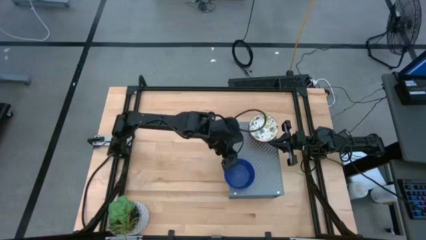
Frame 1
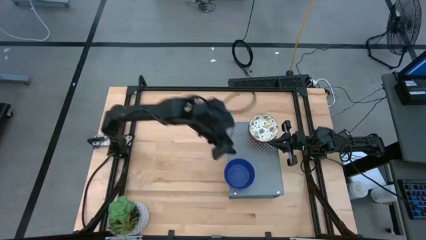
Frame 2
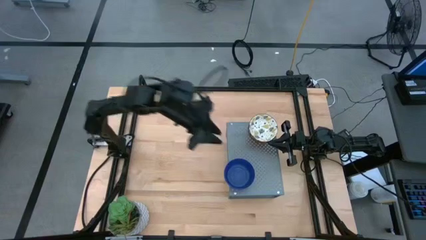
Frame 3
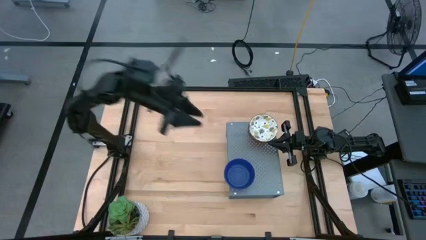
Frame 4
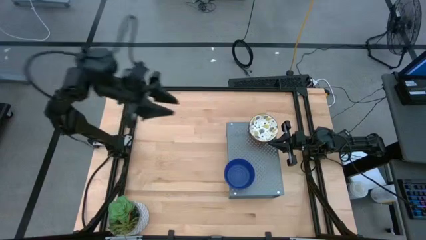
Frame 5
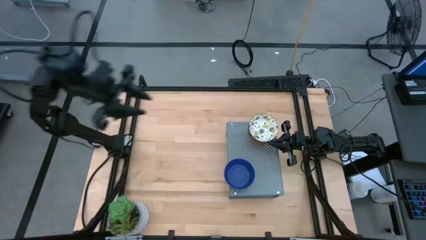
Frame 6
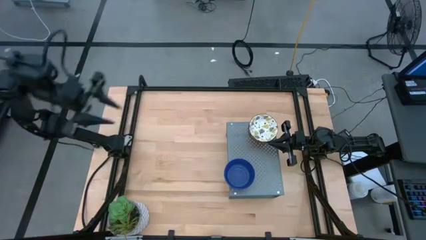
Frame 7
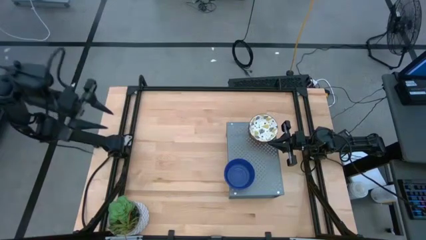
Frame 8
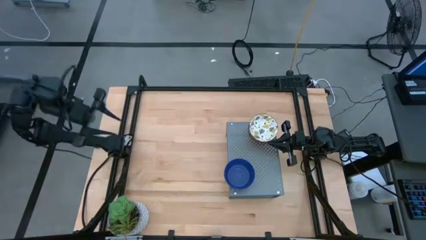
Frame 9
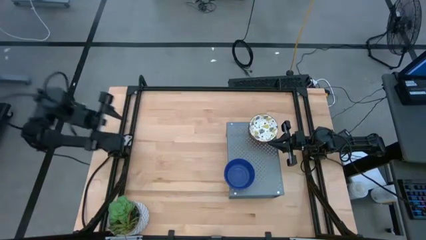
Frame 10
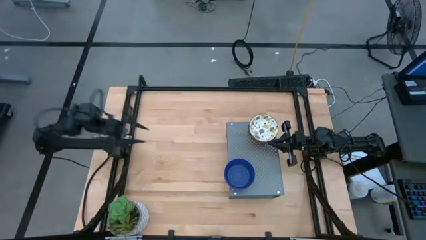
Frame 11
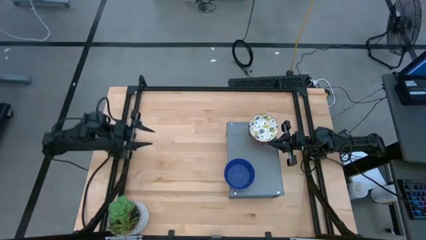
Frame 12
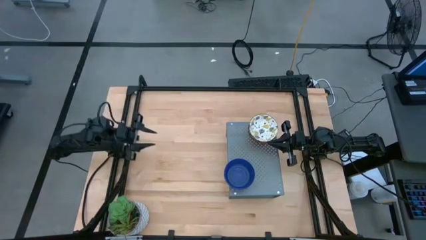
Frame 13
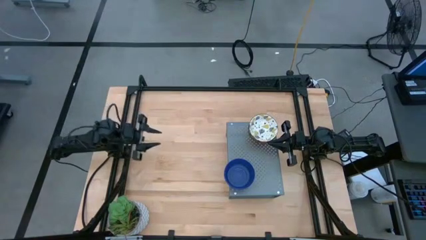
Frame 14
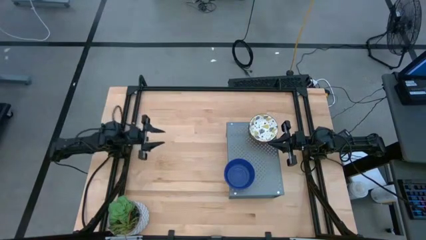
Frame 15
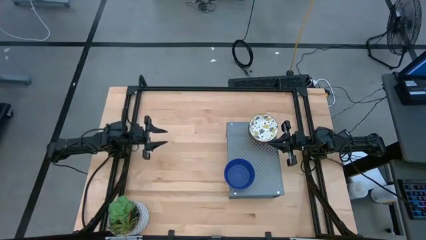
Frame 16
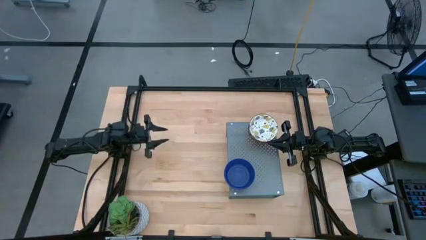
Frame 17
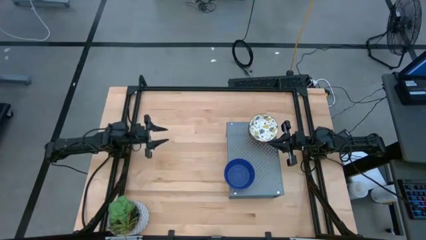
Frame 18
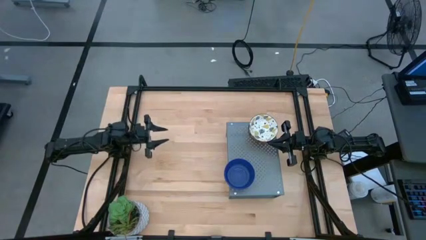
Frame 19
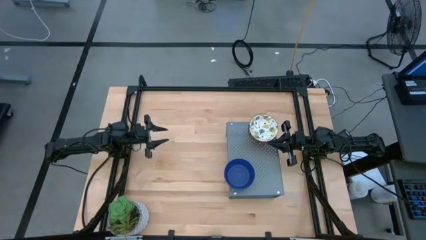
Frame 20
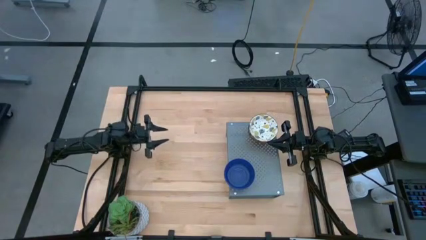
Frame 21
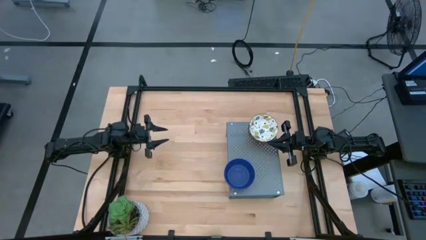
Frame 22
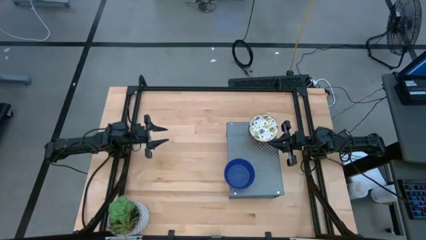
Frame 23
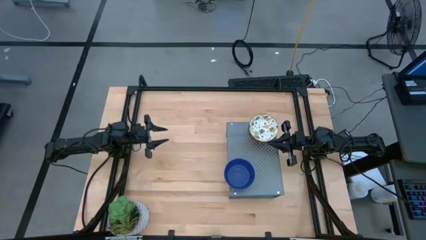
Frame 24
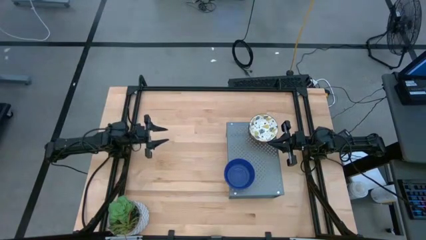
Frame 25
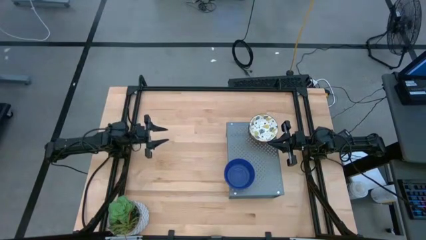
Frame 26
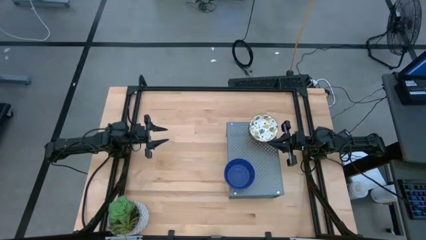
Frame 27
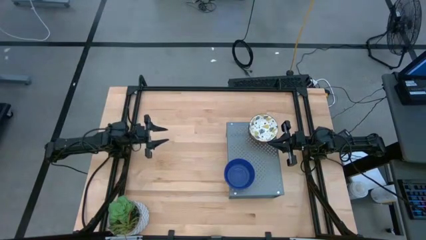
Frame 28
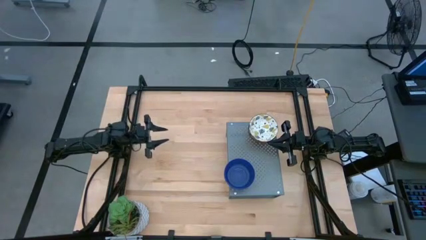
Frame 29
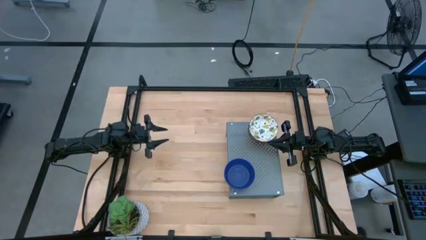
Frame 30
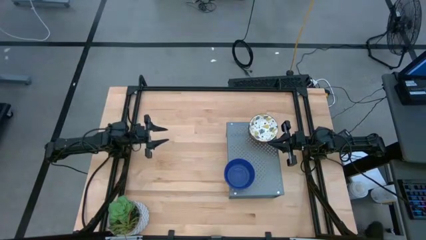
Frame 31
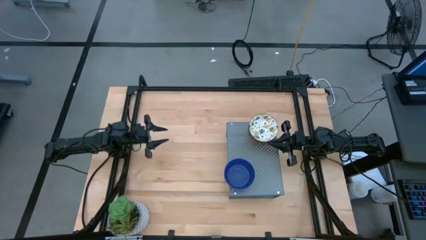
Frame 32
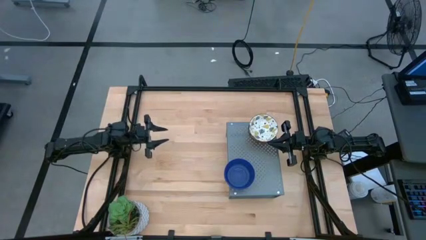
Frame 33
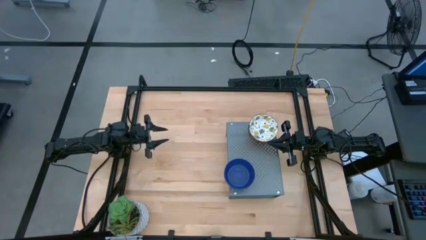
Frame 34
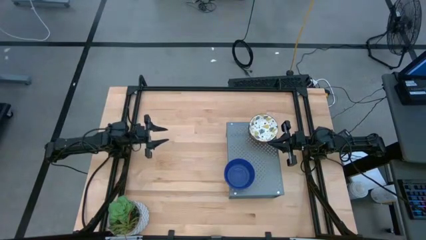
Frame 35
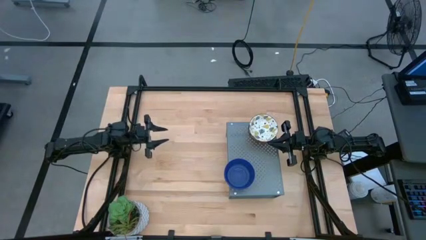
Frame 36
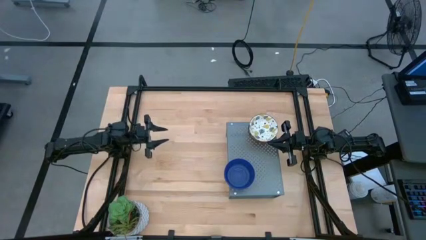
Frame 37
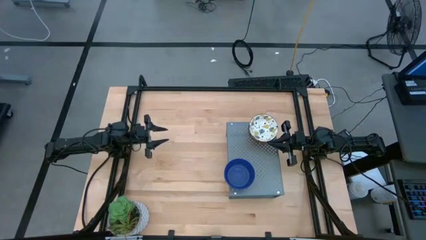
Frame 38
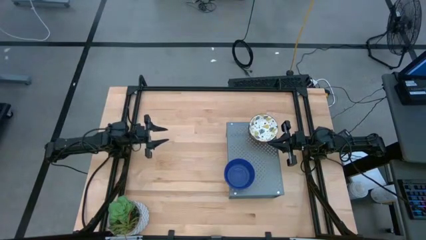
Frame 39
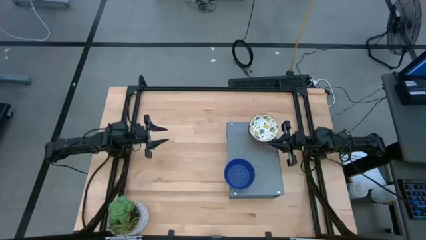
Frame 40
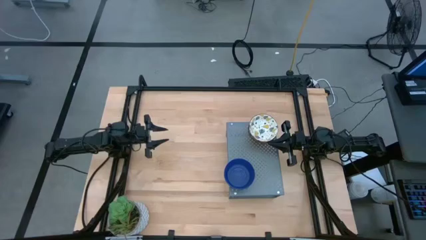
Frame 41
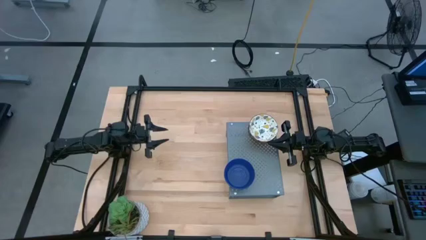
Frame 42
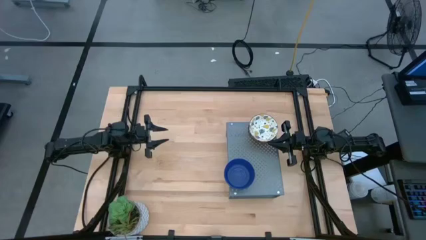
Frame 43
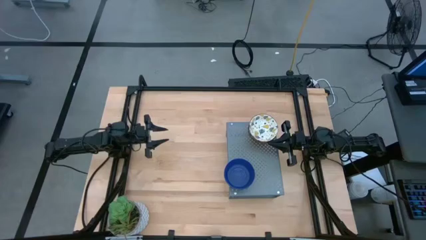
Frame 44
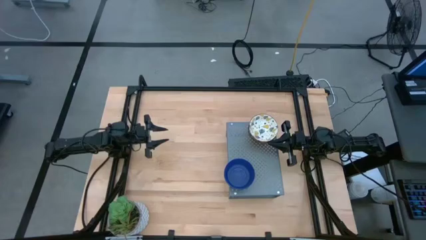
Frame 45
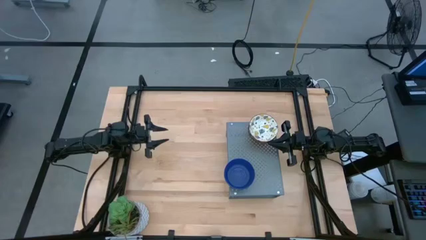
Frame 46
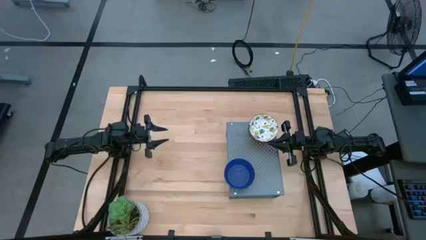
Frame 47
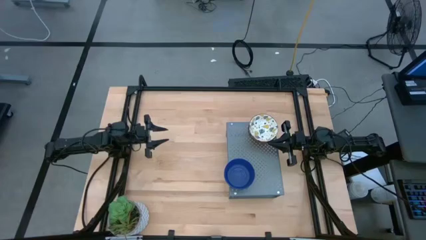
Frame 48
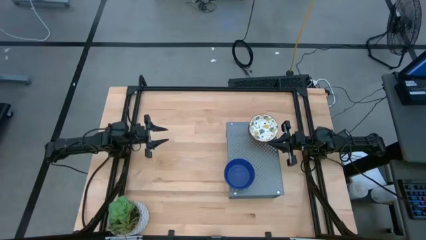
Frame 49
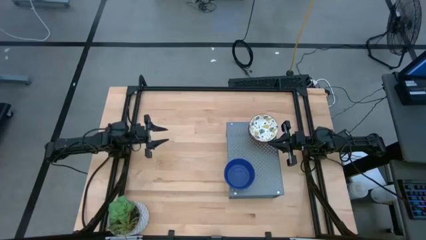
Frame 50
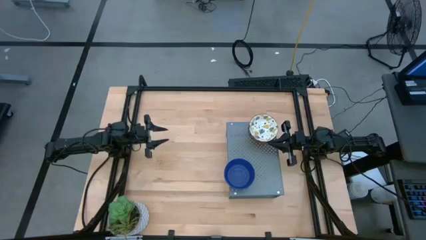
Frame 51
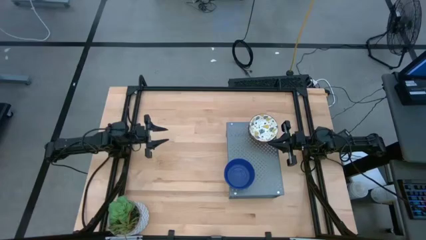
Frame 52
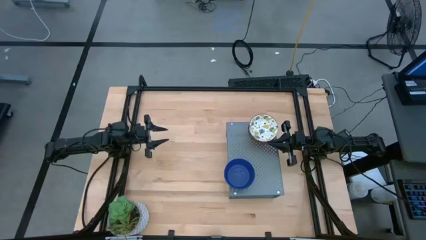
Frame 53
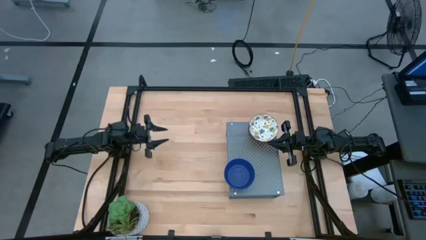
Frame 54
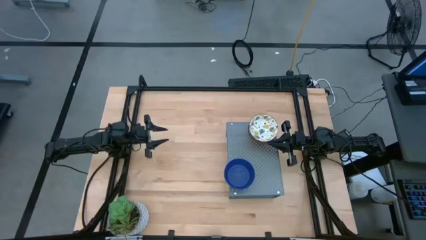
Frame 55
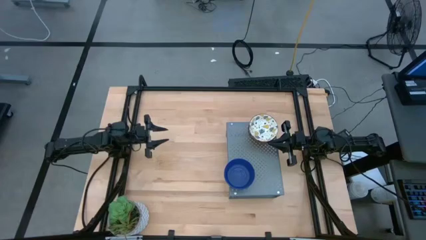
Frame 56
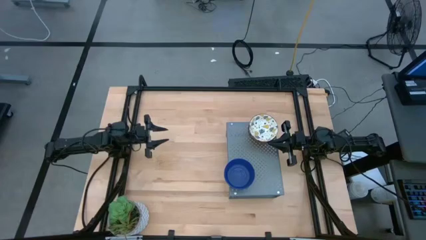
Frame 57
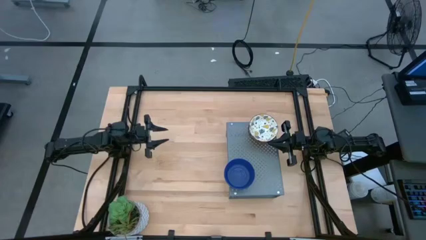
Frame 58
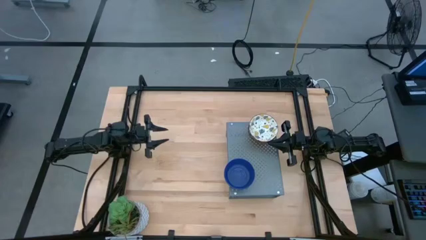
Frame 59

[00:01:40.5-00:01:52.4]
Task: Pick & Place Mini bowls
Return to Home Position

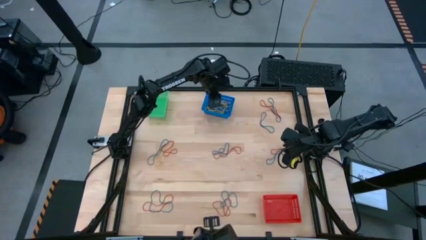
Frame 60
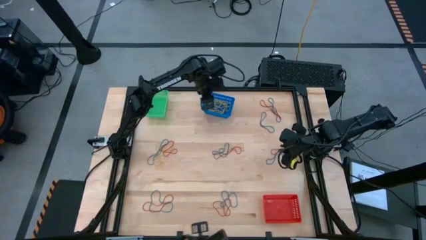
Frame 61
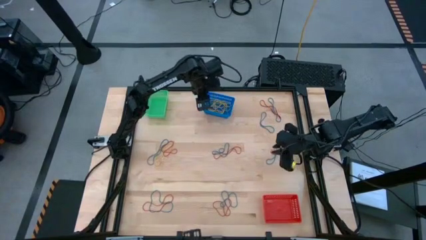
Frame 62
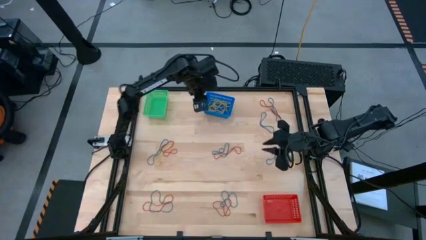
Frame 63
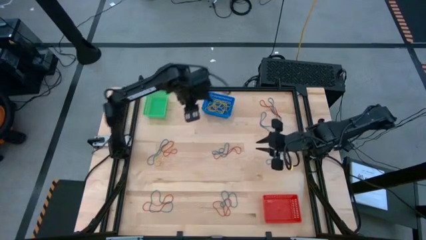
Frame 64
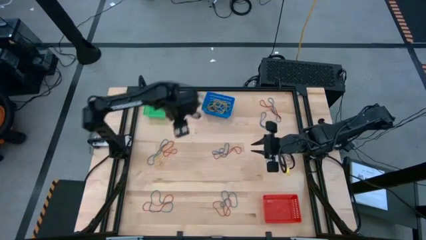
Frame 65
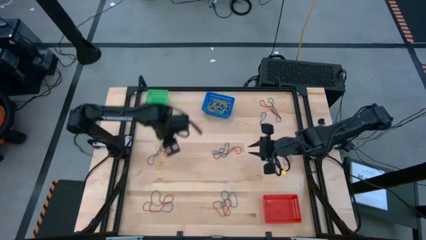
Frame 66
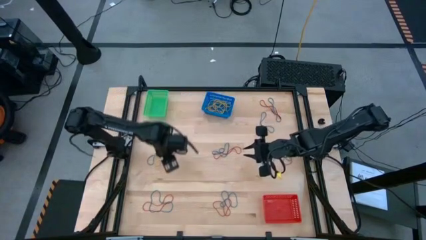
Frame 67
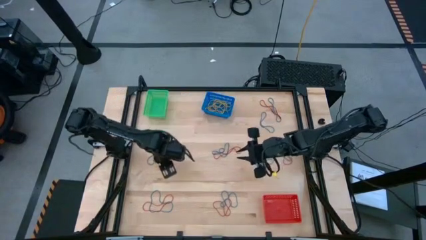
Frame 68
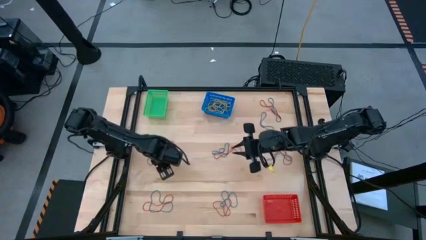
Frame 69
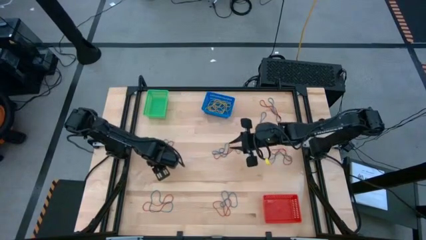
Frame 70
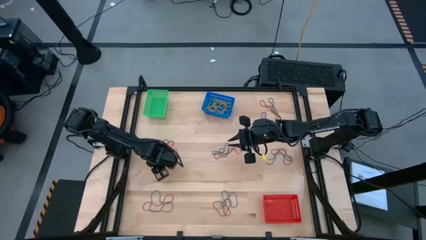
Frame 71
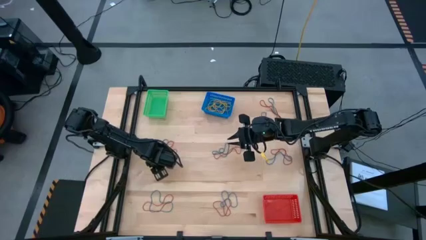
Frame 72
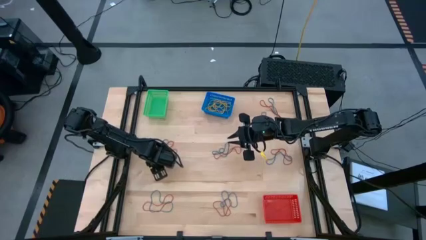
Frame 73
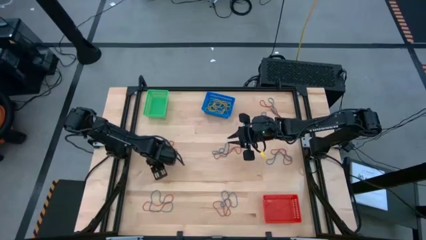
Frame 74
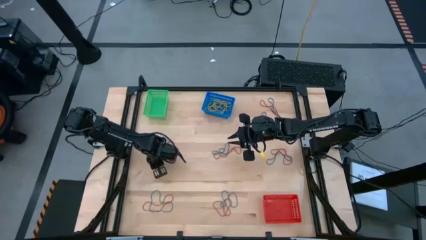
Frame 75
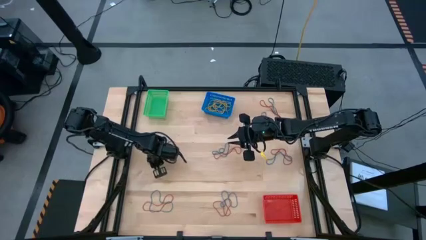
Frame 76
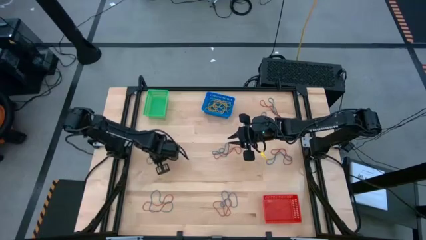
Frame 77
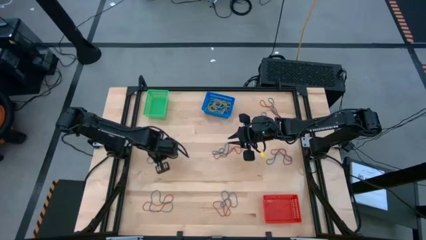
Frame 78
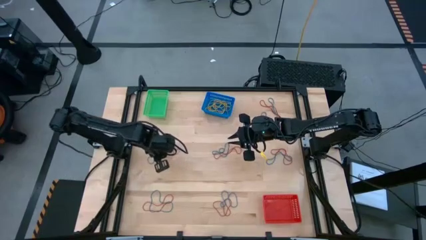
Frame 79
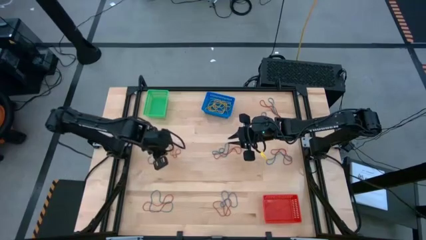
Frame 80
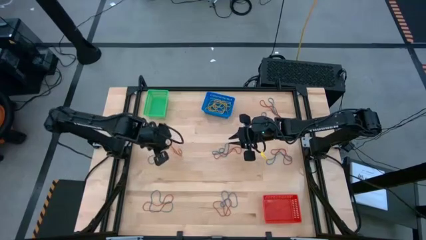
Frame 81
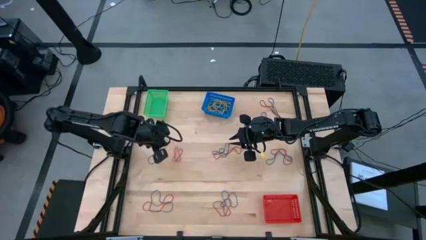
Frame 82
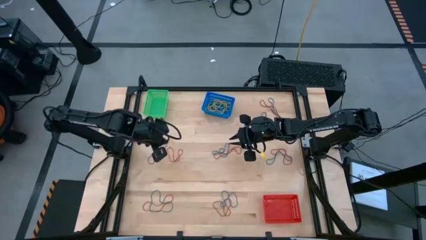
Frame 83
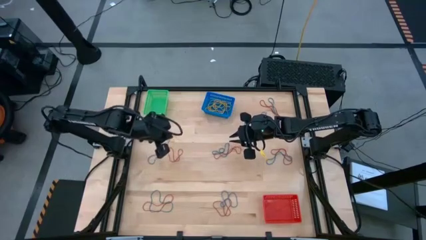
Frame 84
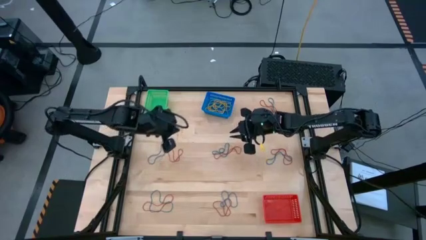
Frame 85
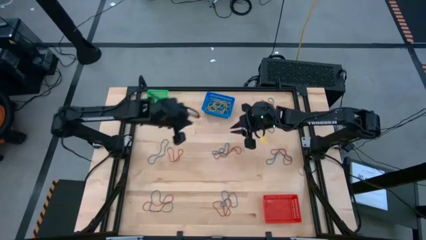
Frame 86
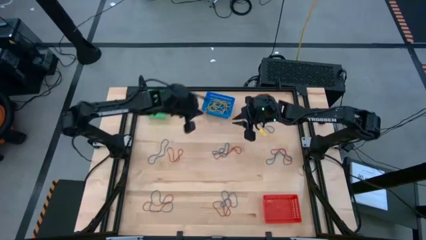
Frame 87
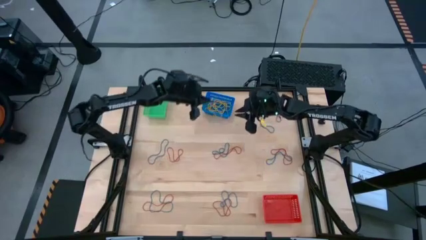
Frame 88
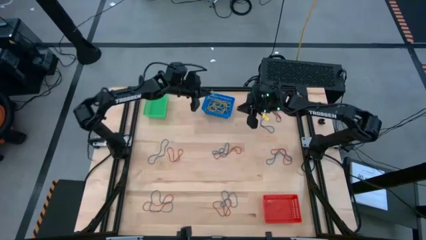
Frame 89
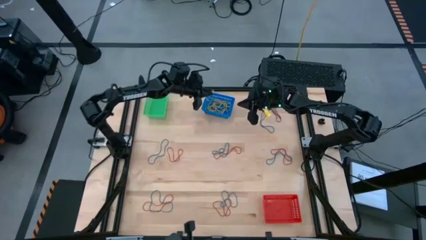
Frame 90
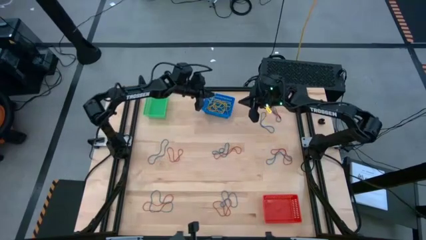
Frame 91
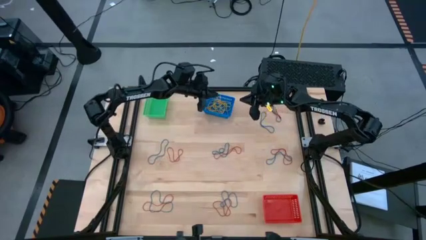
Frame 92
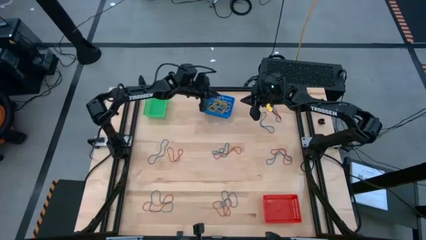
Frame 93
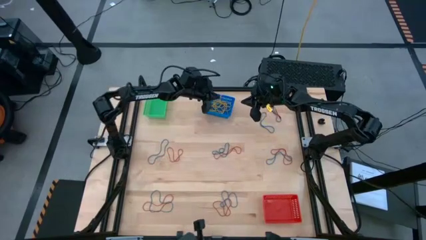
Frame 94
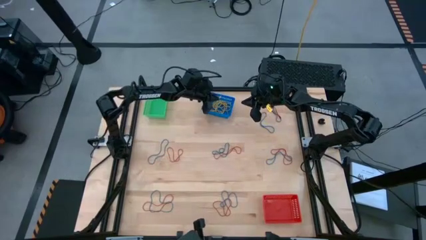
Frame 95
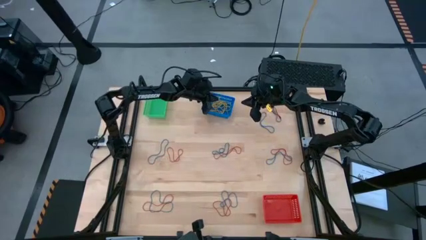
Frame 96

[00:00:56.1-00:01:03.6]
Task: Sort rubber bands into baskets
Put the yellow rubber band into the blue bin
